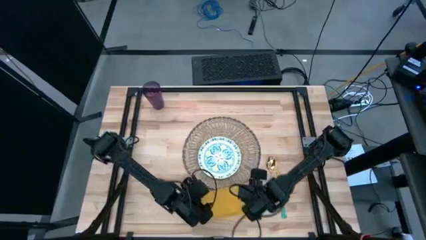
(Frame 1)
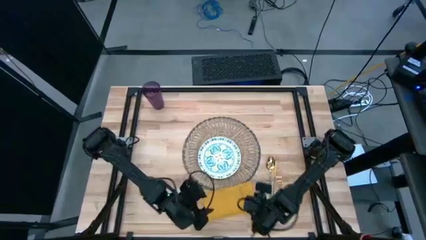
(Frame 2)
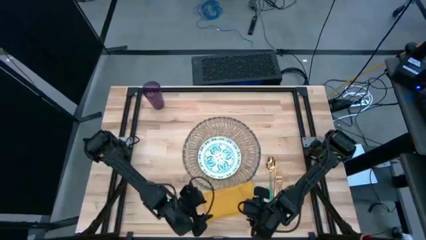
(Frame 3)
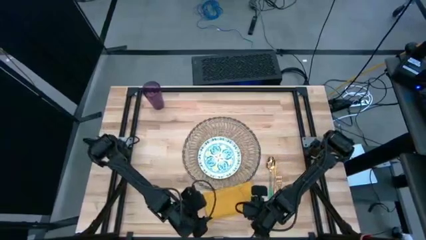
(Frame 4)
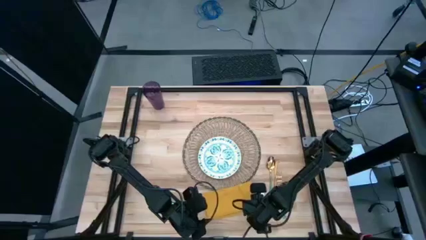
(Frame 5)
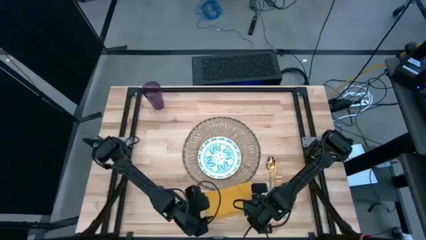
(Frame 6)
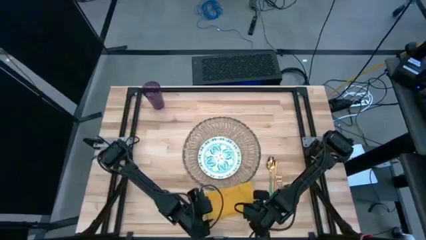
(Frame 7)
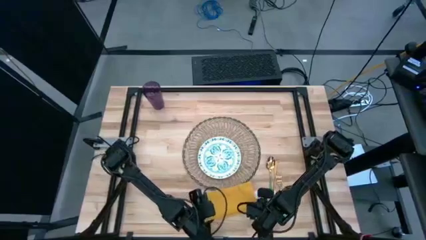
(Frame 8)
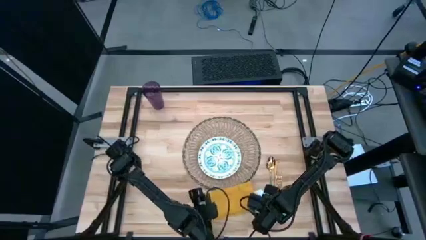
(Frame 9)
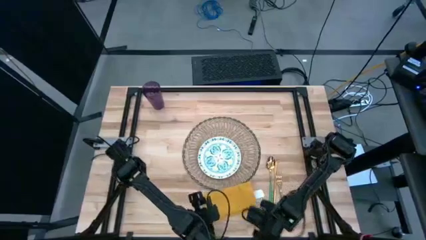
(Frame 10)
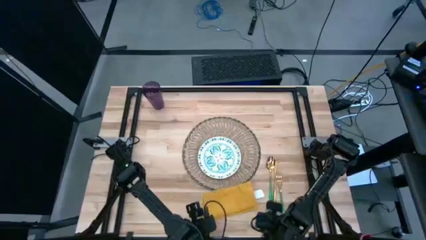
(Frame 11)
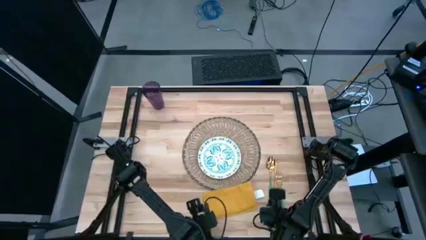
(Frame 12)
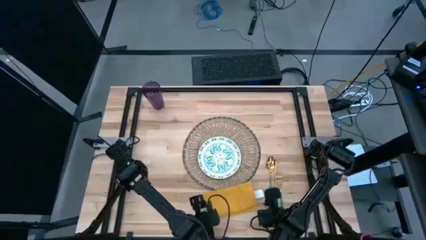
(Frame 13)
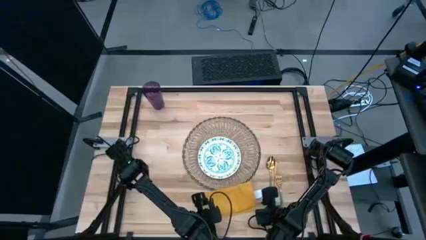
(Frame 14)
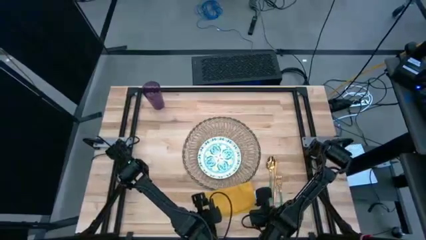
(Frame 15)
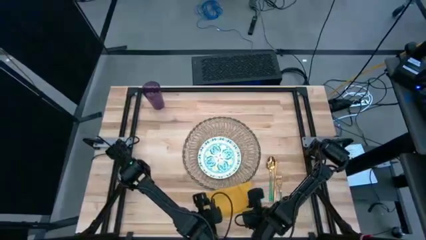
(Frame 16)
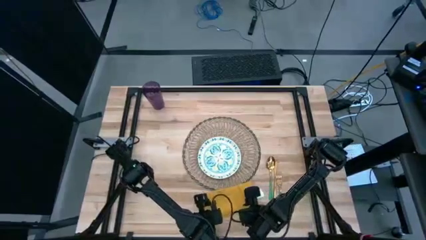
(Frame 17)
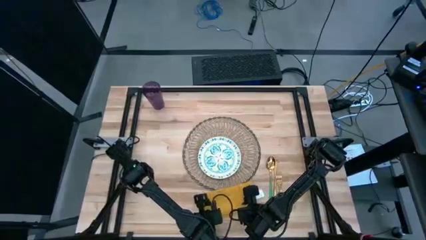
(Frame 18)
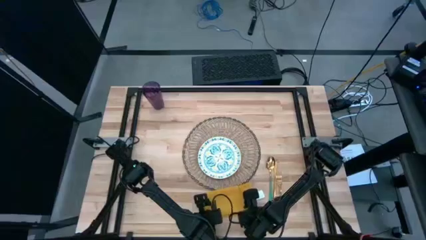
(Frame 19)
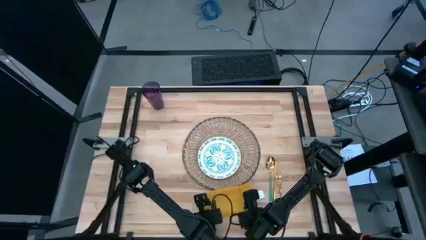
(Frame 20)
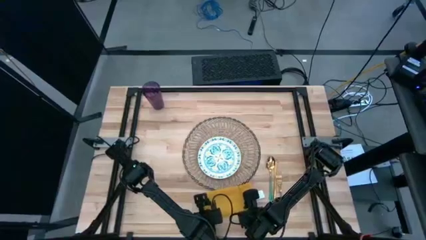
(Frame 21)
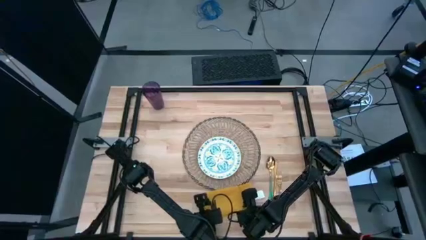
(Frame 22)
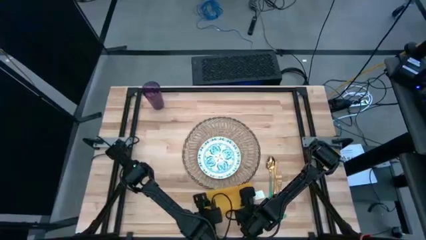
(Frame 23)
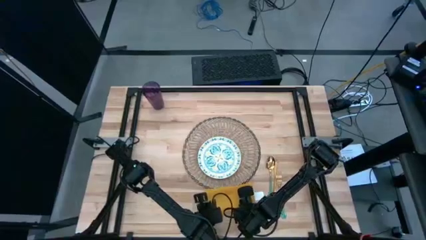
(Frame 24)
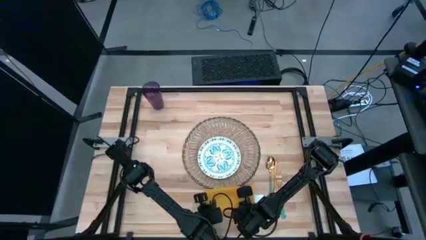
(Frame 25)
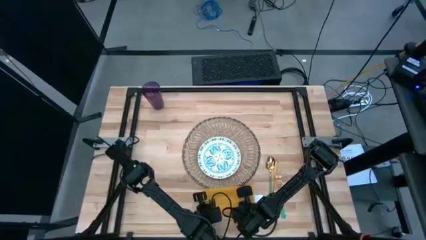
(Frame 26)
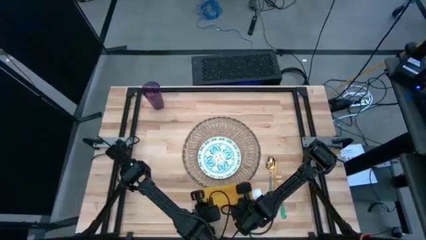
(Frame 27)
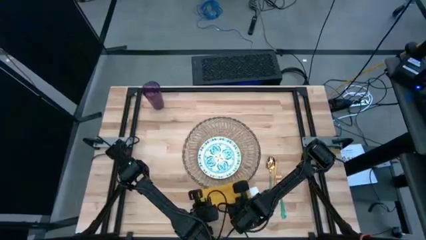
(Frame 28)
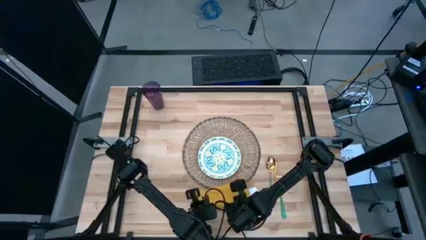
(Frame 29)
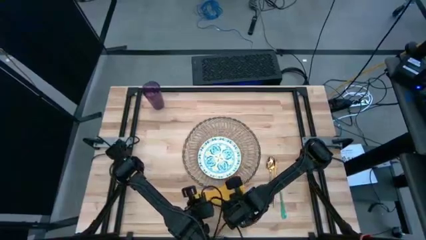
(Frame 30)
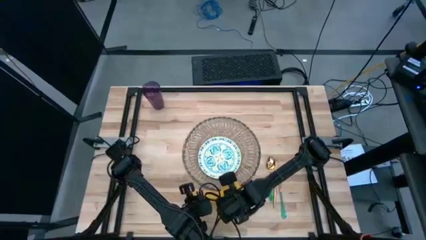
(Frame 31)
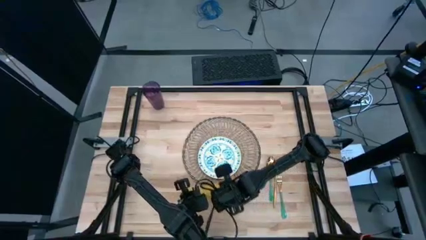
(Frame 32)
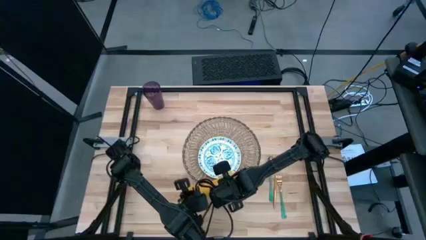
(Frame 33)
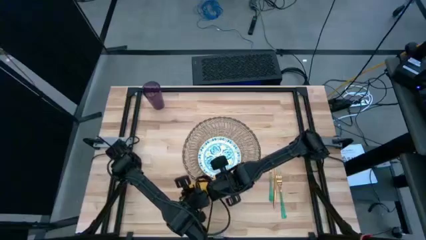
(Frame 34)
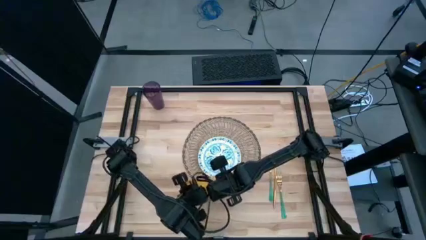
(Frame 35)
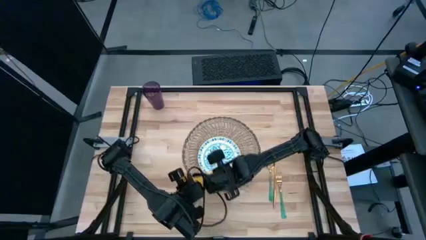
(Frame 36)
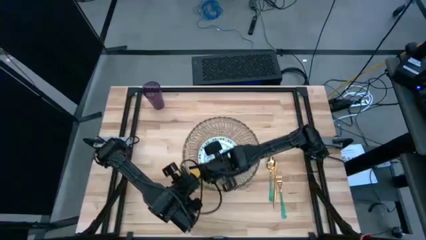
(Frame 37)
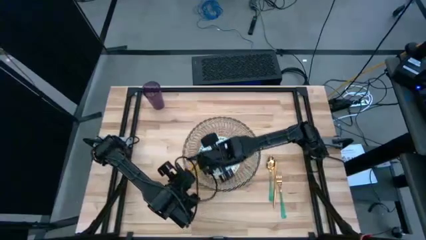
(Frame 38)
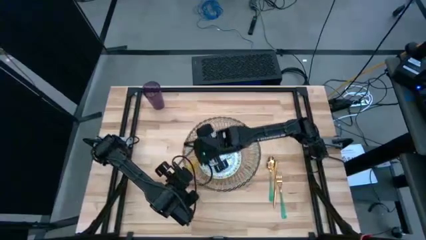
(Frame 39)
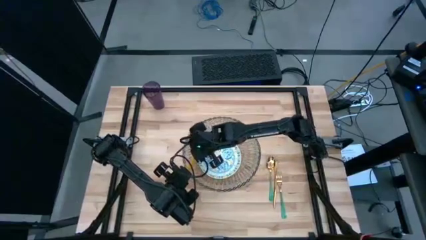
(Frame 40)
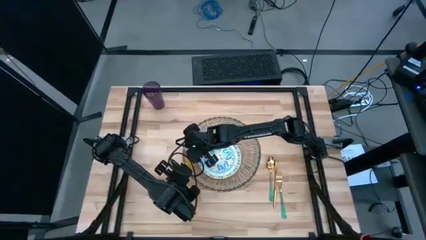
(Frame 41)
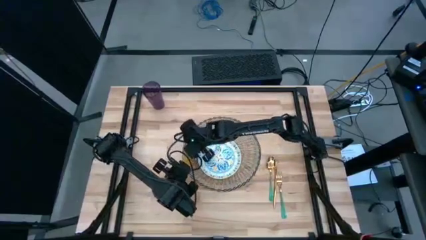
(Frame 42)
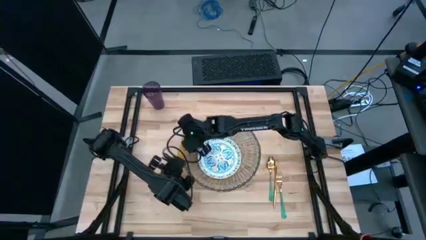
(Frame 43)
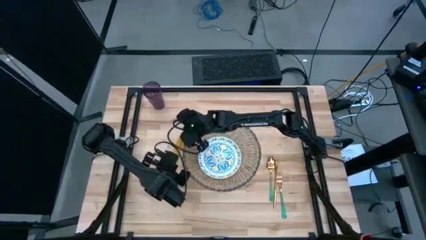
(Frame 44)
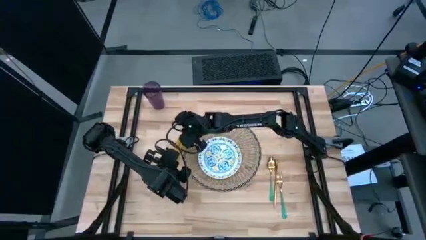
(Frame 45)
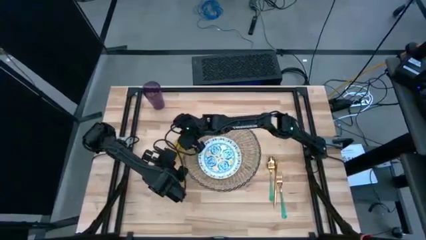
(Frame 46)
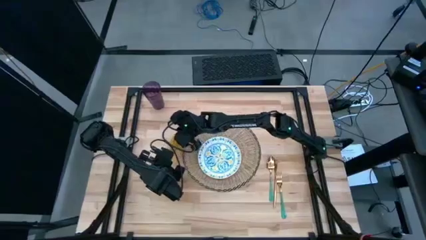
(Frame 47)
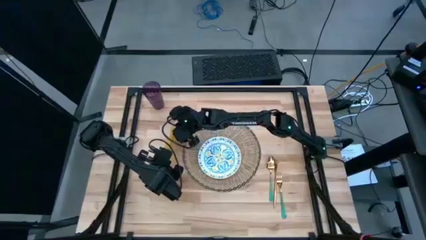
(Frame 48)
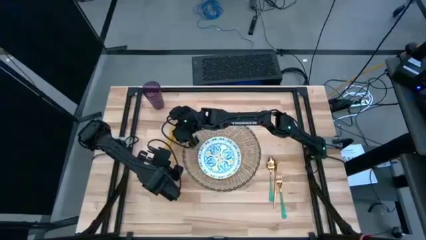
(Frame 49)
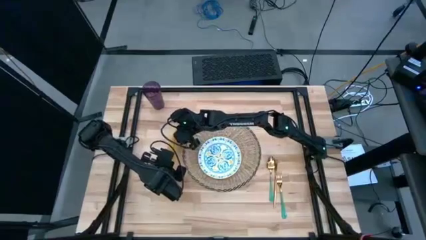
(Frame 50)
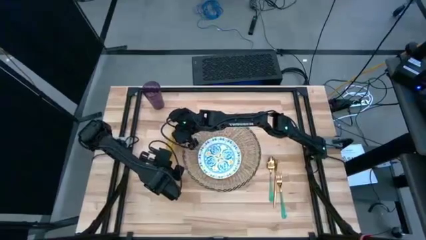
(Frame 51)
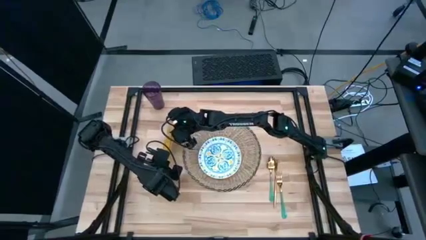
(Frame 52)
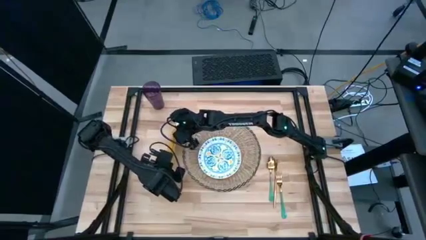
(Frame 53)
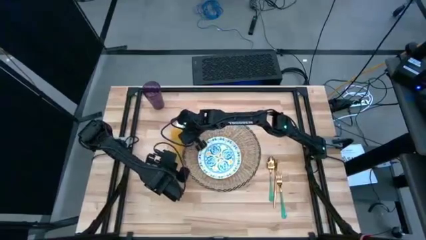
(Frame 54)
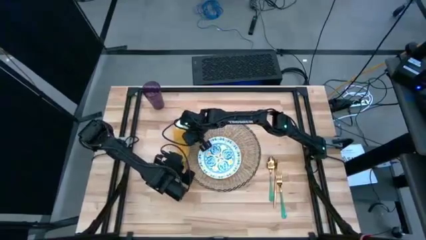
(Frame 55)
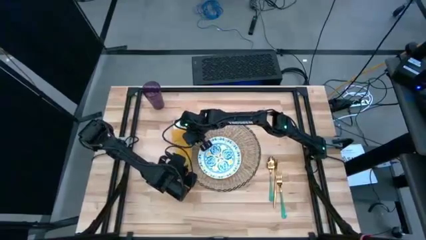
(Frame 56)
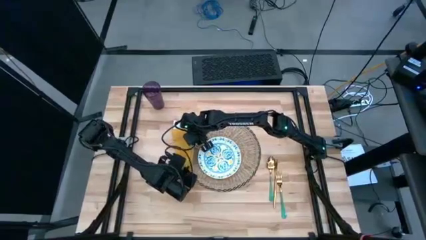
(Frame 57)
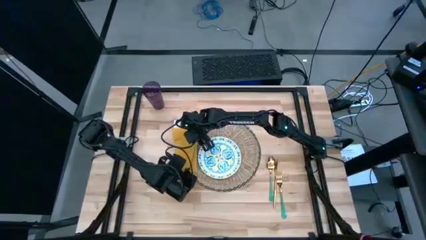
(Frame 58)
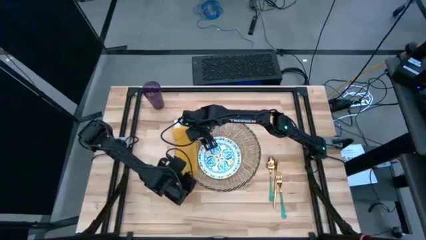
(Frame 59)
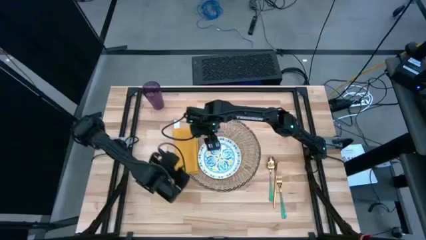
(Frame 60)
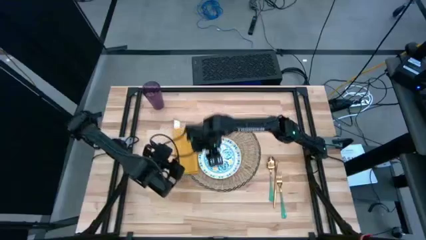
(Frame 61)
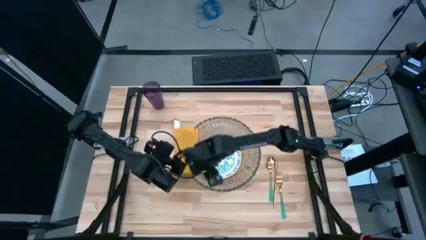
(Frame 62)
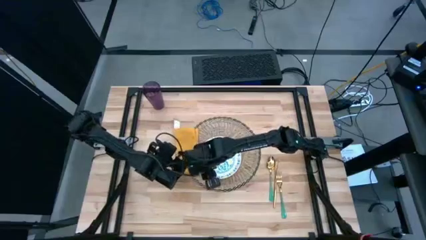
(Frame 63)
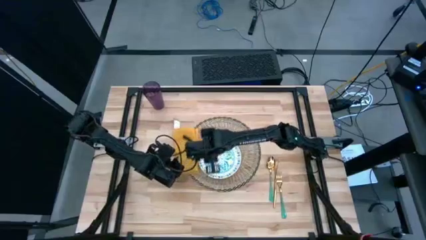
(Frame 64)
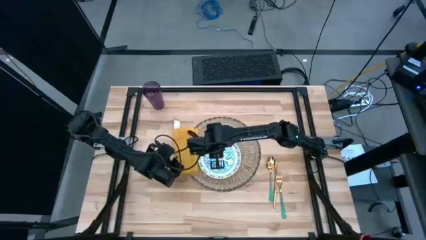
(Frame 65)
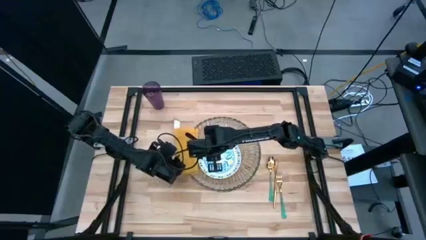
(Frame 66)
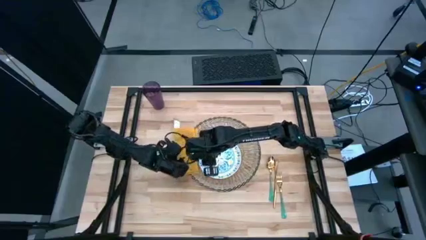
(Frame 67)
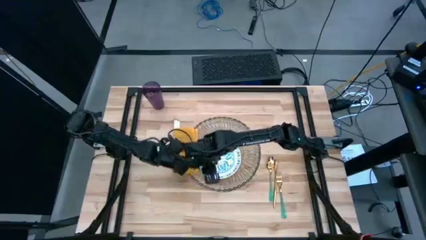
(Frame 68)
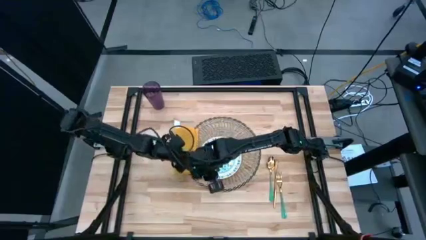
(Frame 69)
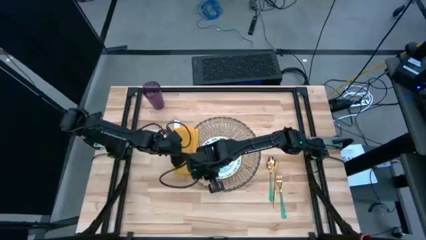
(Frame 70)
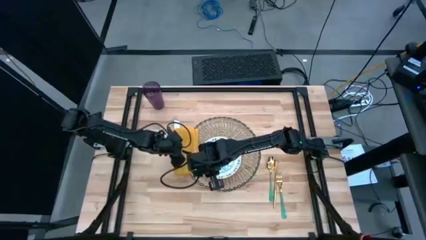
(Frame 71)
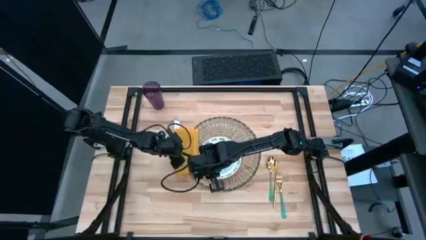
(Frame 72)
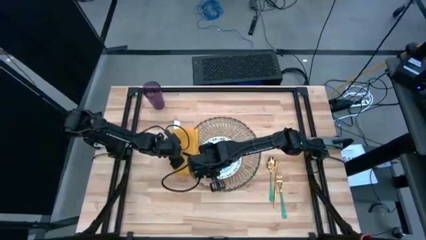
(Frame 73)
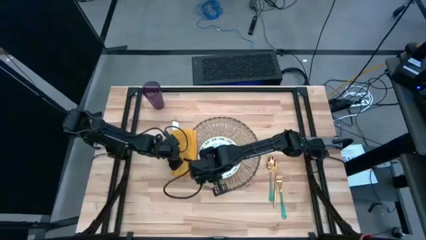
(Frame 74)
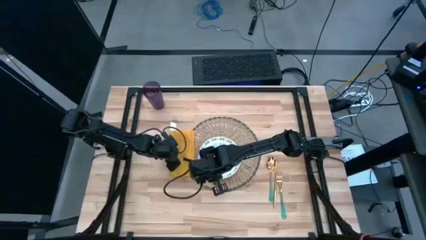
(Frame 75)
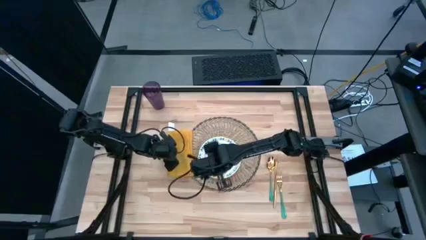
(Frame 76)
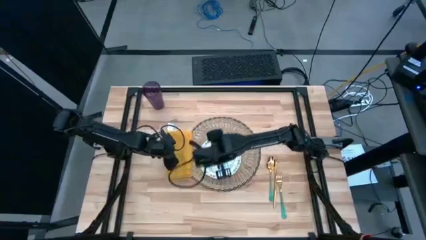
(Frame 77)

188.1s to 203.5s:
Task: Set table place
Put the yellow table napkin to the left of the white patterned plate

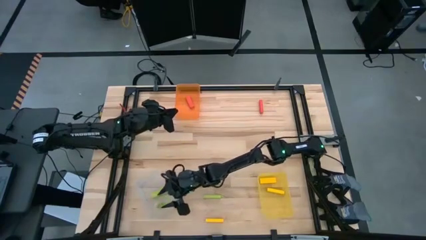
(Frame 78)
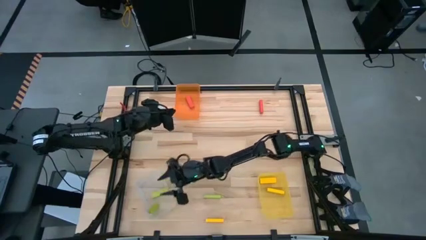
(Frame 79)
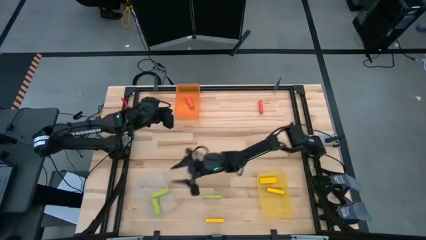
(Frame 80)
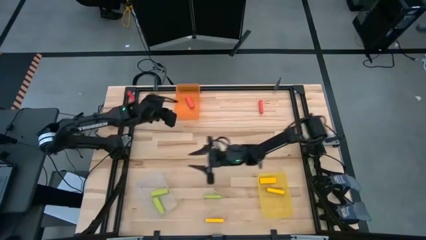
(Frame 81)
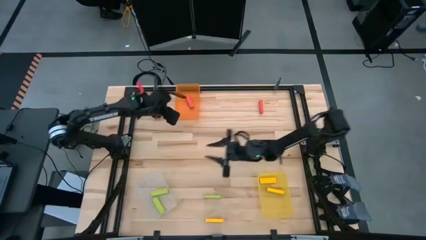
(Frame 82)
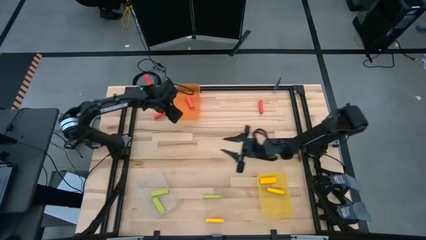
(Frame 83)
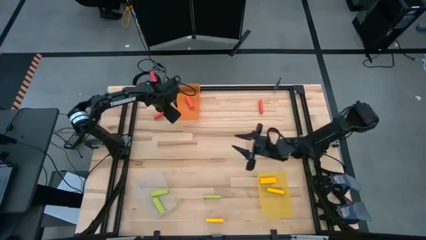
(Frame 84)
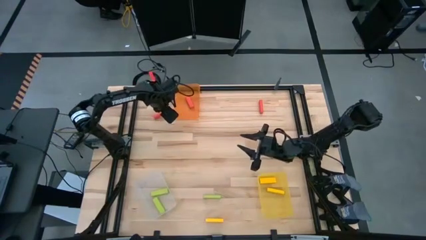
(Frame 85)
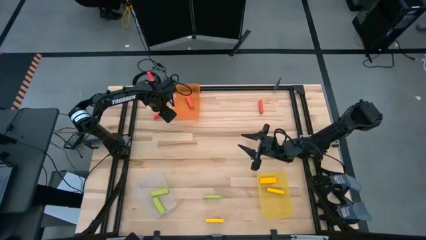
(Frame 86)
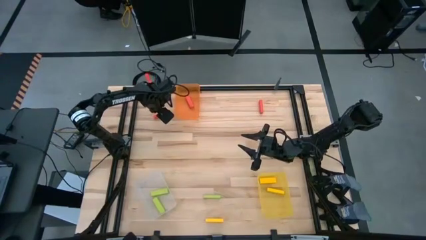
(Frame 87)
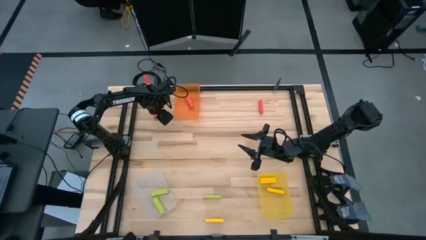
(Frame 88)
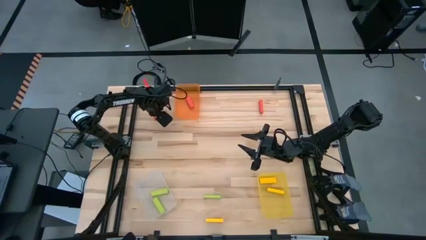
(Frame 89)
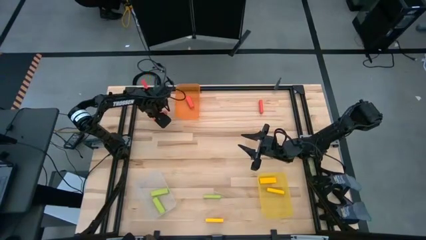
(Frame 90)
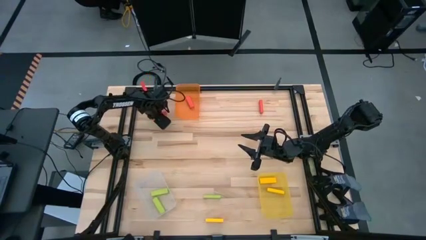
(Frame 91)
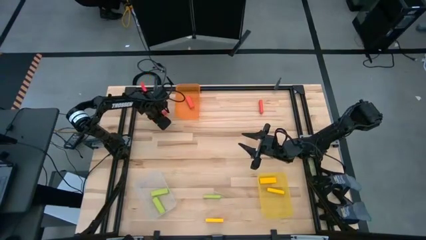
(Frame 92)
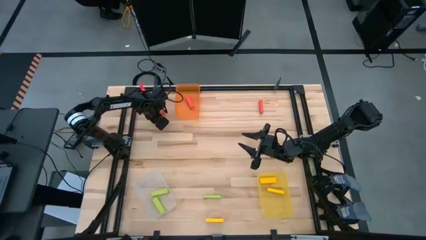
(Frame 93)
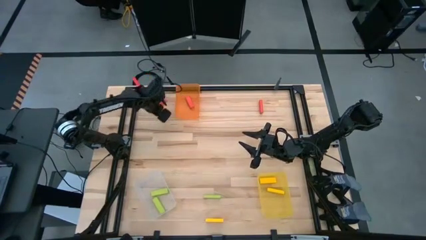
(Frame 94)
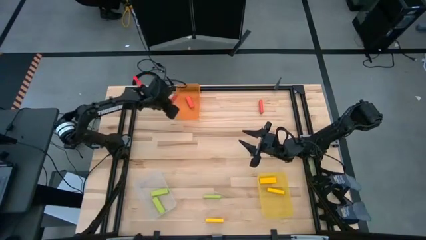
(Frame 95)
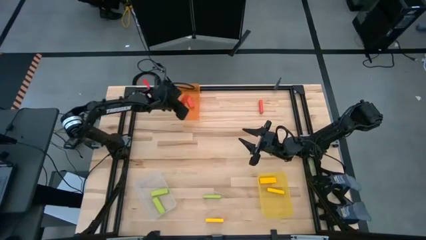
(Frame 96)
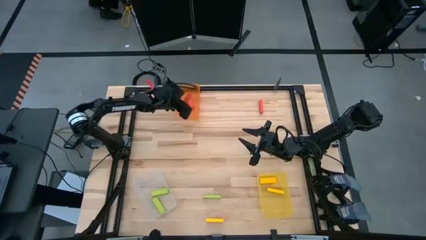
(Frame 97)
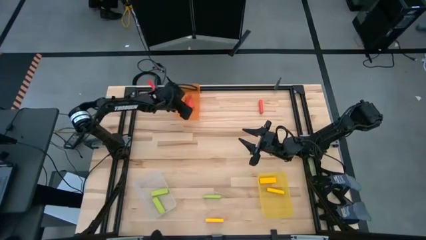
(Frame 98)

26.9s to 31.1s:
Task: Sort blocks
Put the left red block into the orange bin
